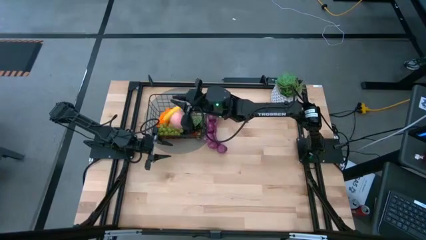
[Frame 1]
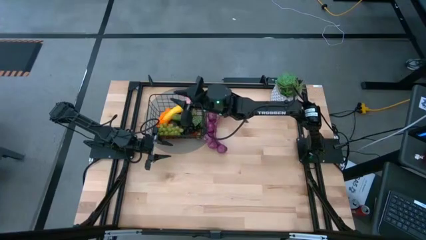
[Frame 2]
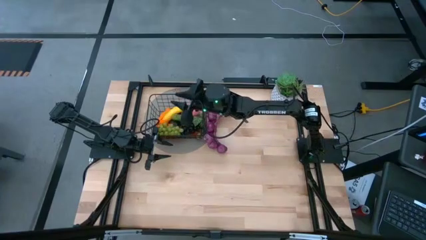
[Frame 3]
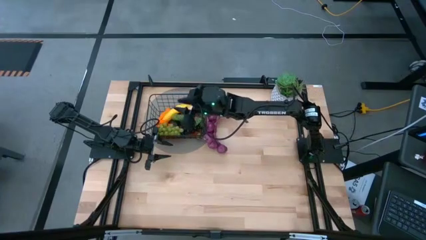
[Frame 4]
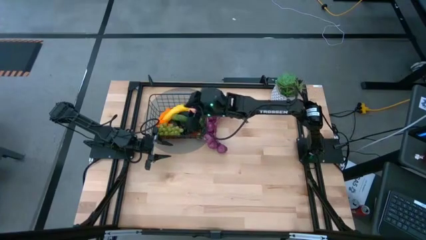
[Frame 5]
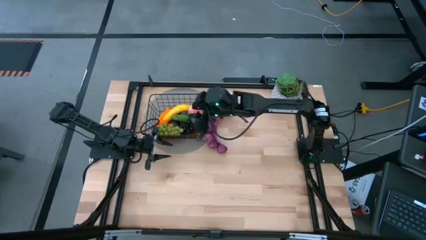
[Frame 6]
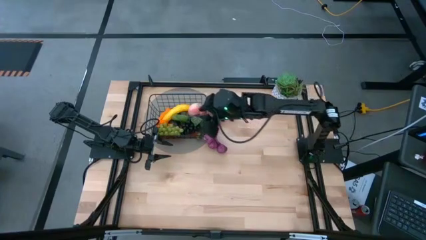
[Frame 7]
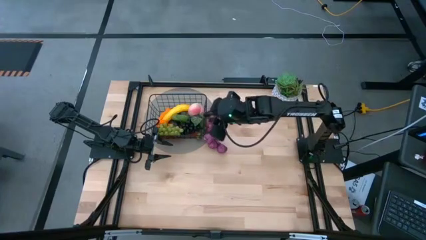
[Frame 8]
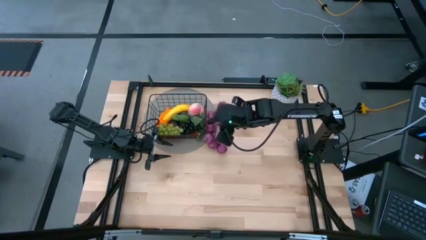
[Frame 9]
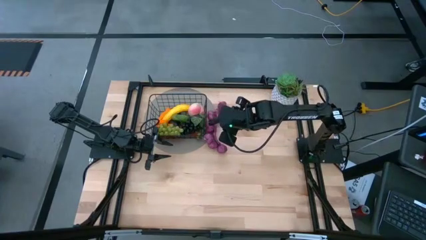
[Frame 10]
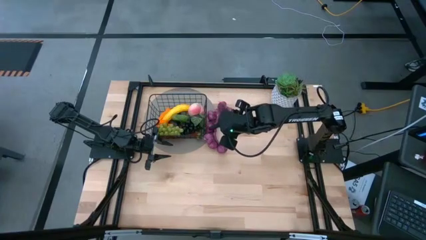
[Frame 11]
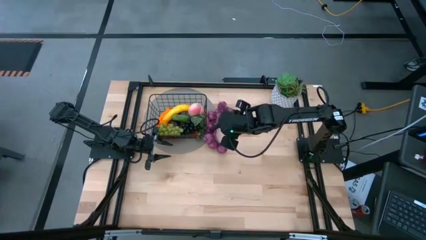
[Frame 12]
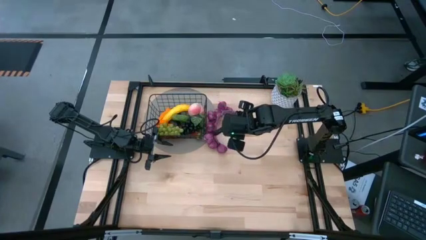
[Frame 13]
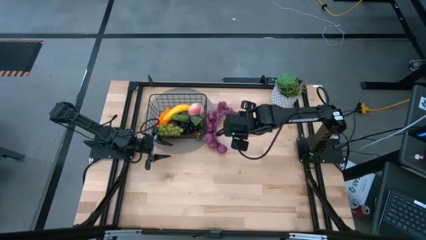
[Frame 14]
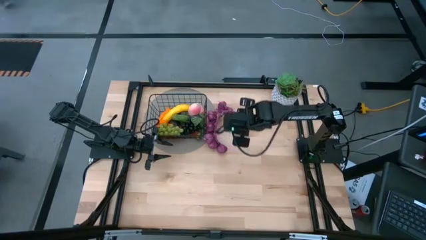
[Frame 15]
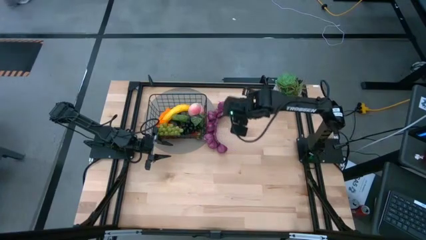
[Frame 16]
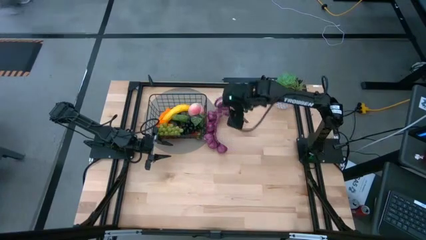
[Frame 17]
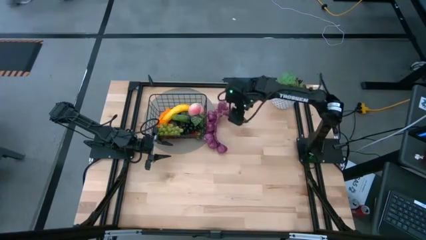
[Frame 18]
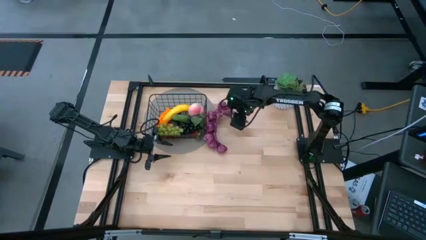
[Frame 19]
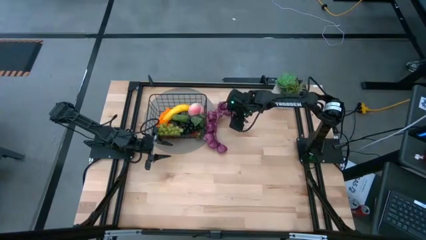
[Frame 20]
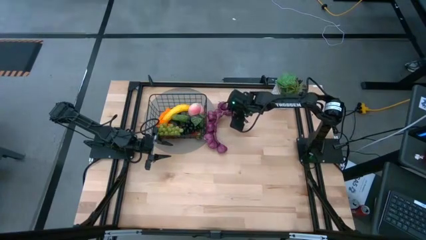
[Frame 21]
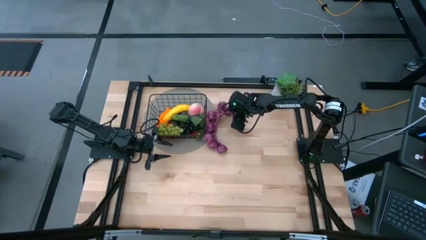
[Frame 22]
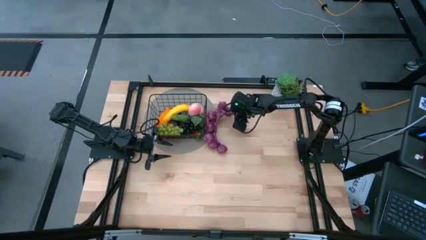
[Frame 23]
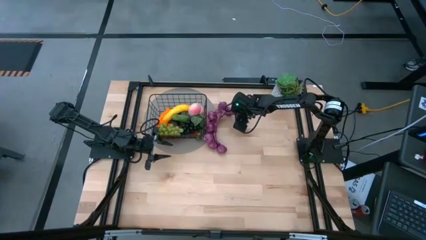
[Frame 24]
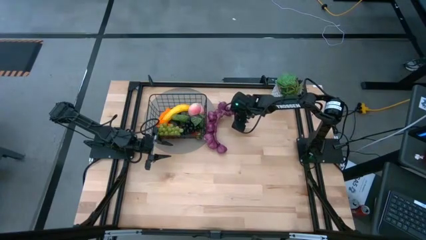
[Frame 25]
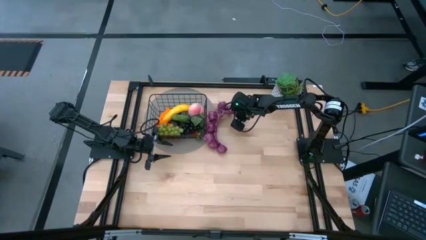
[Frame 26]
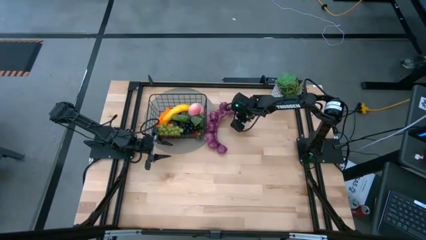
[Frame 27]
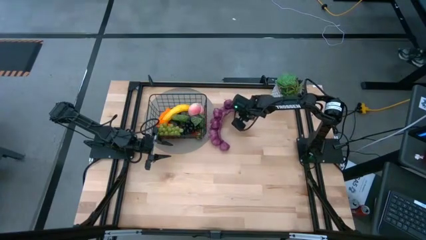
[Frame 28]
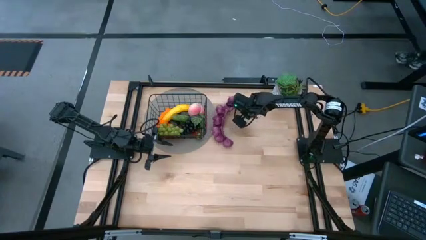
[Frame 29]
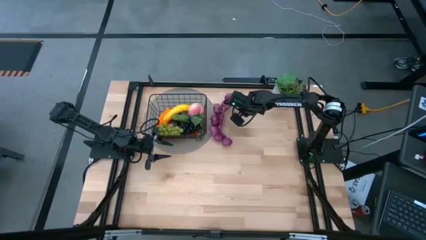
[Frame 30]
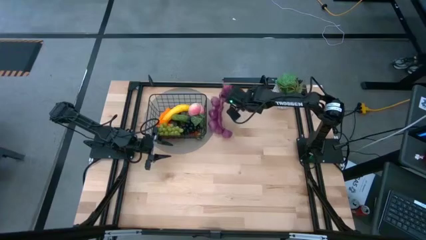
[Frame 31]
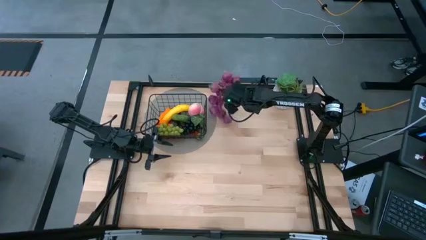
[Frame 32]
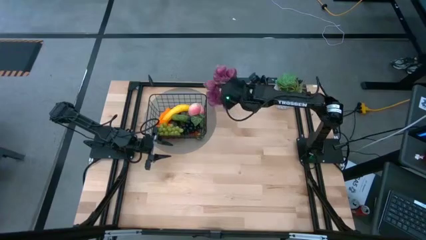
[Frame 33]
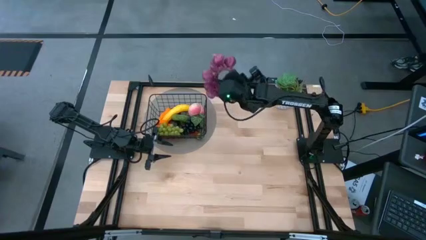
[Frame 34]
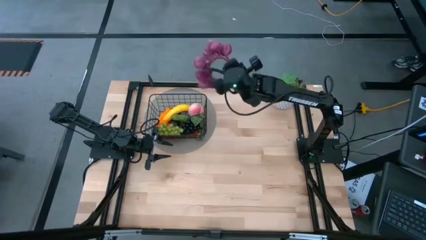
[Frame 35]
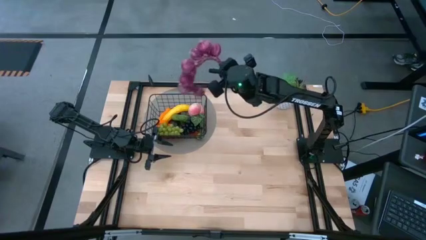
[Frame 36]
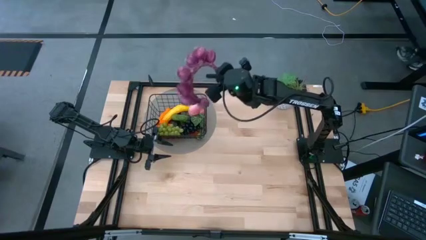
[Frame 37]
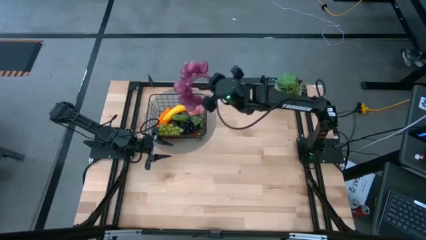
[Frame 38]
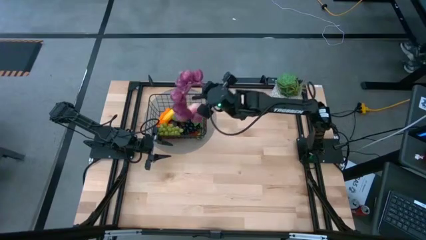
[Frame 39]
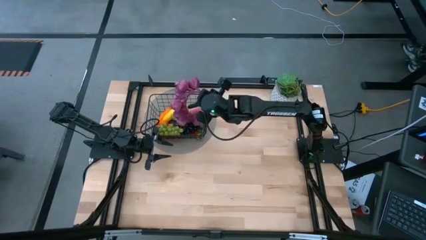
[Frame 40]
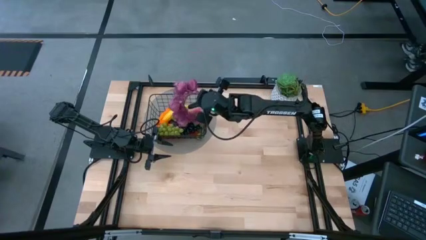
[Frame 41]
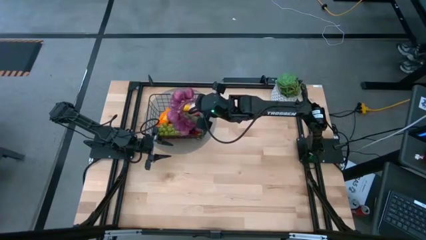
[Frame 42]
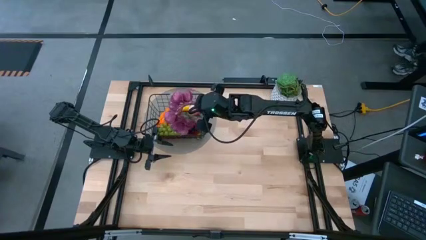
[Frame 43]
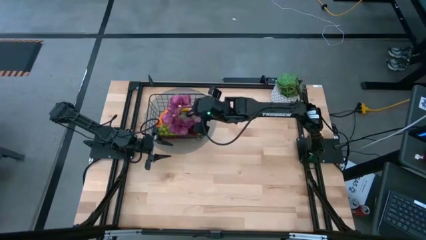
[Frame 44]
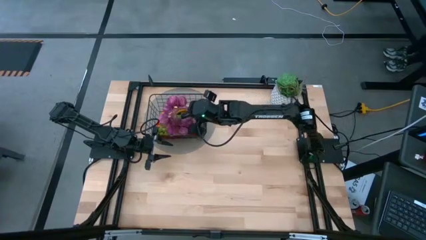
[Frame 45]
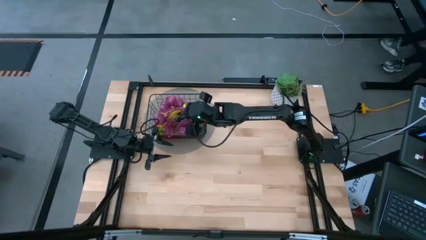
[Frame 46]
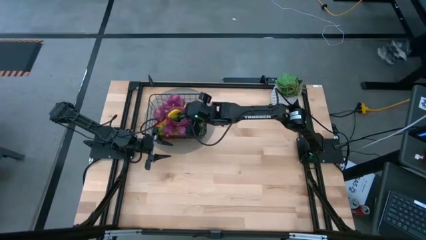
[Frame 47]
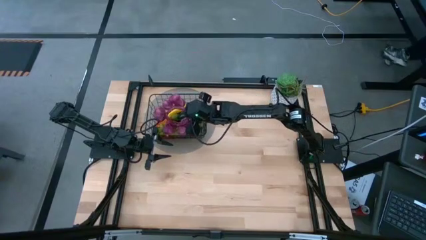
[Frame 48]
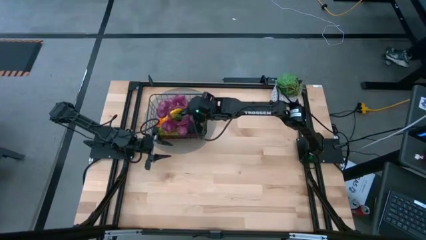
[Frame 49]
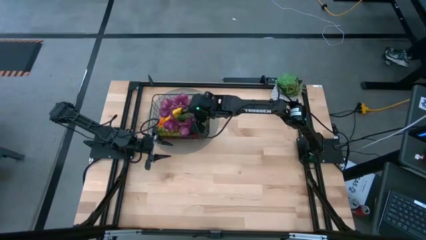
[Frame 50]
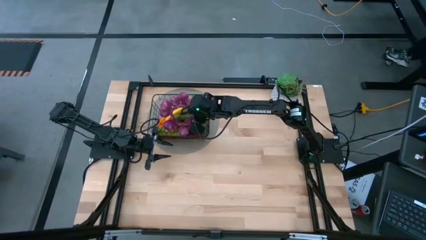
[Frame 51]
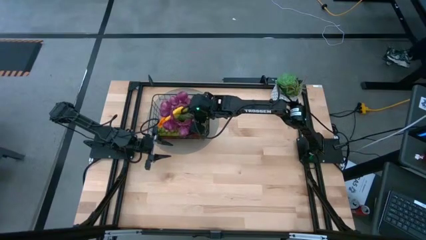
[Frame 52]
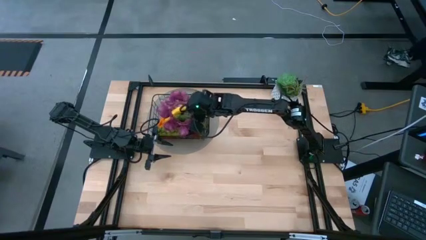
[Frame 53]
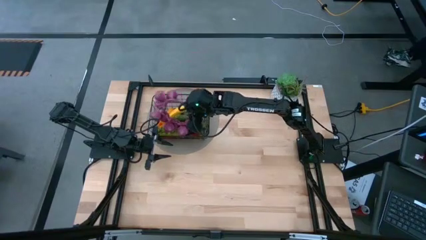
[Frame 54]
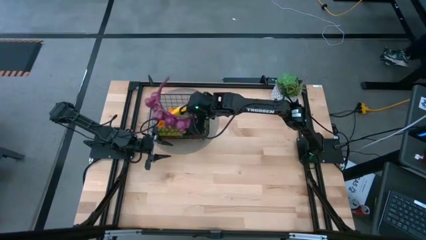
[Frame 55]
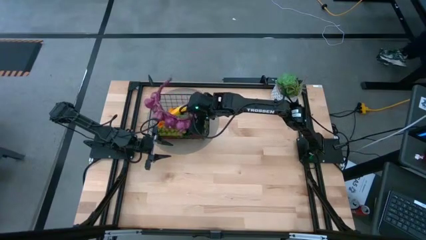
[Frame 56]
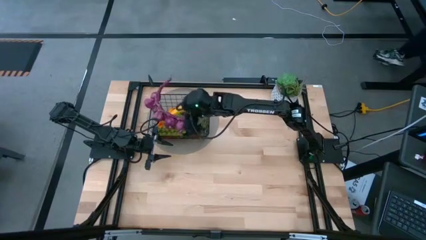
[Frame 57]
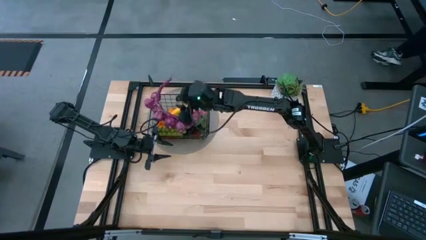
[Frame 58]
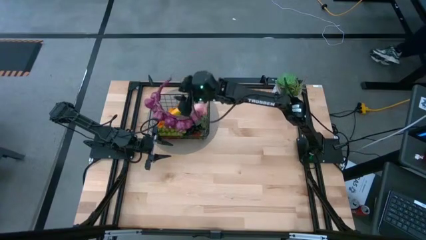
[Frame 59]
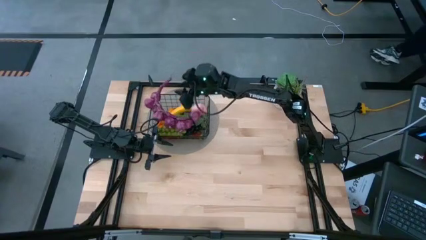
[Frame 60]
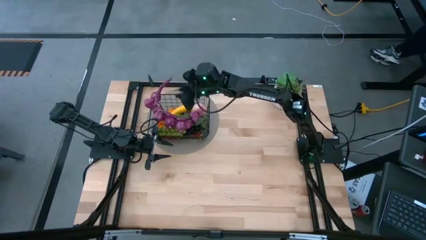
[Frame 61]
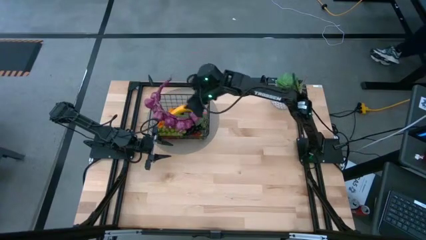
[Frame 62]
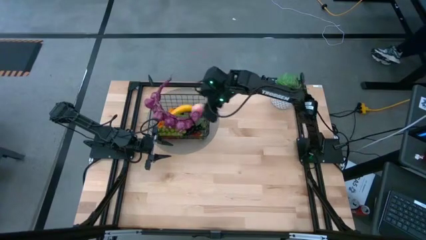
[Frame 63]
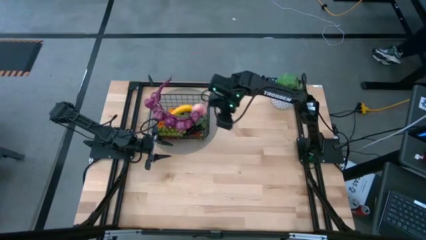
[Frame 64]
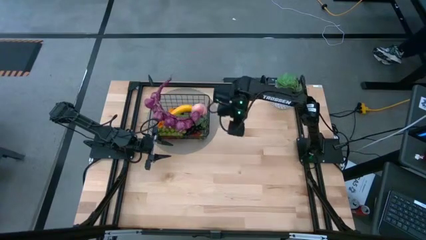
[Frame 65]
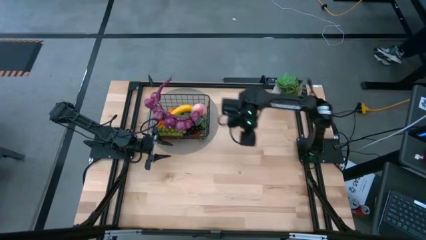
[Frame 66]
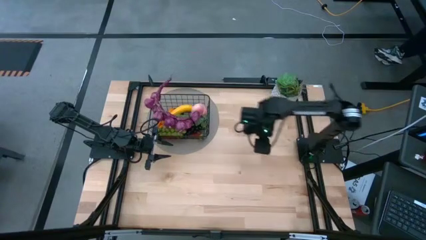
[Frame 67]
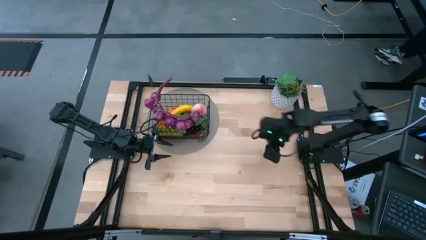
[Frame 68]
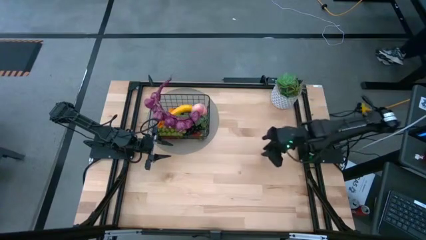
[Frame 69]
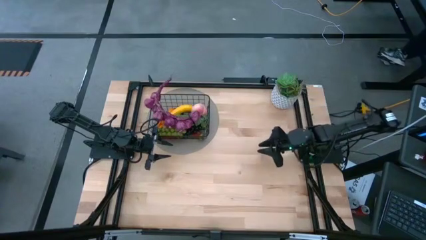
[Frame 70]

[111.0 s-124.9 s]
Task: Build produce basket
Put the purple garlic into the wire basket

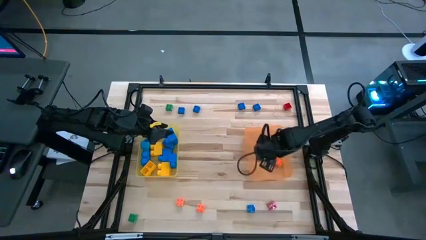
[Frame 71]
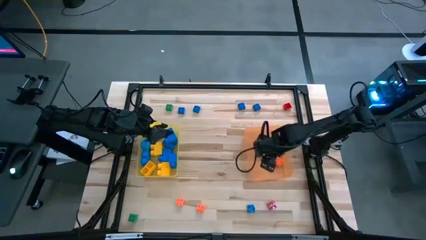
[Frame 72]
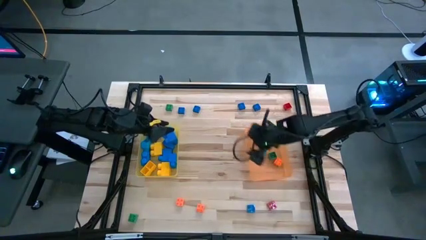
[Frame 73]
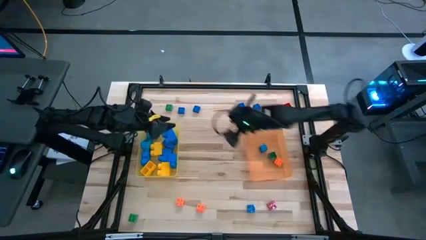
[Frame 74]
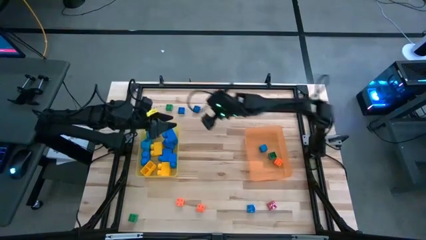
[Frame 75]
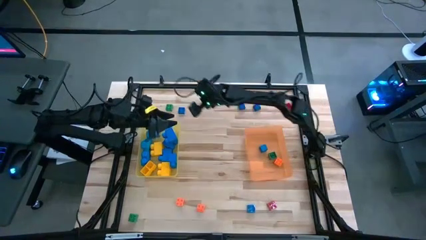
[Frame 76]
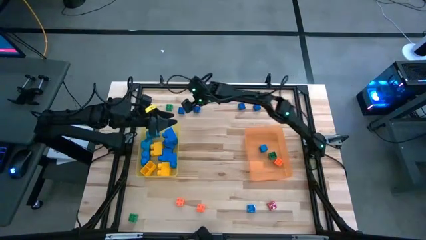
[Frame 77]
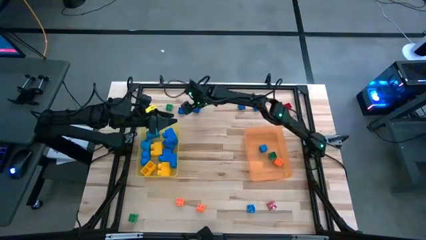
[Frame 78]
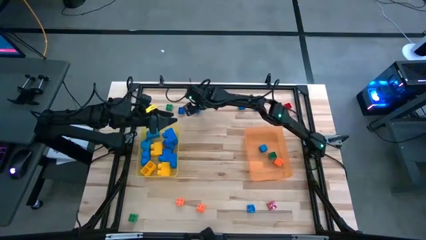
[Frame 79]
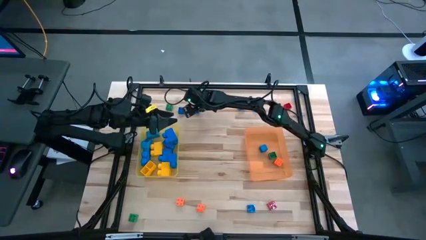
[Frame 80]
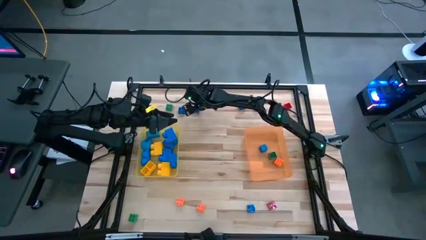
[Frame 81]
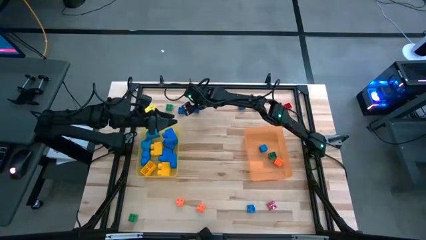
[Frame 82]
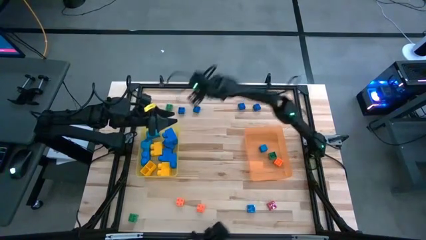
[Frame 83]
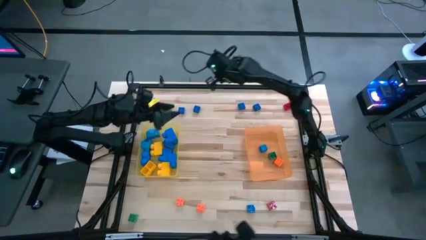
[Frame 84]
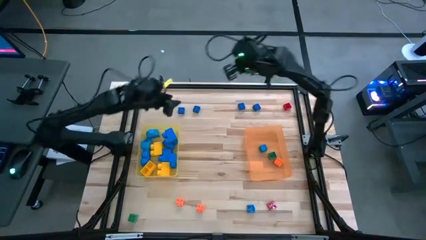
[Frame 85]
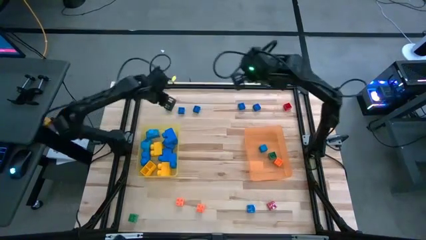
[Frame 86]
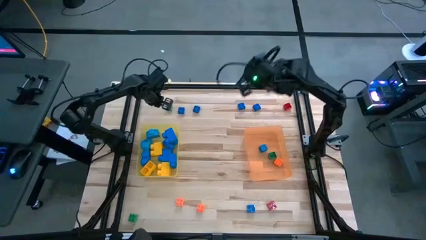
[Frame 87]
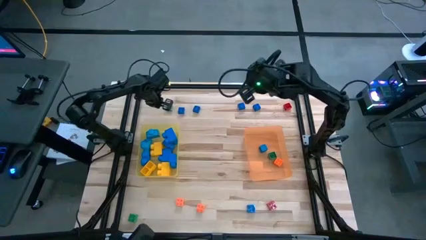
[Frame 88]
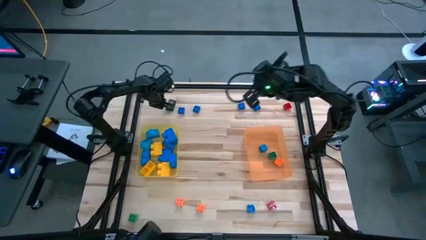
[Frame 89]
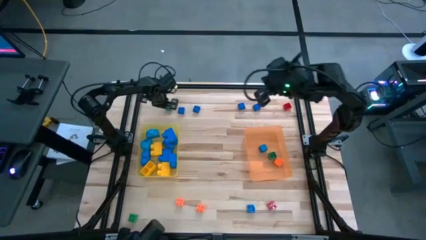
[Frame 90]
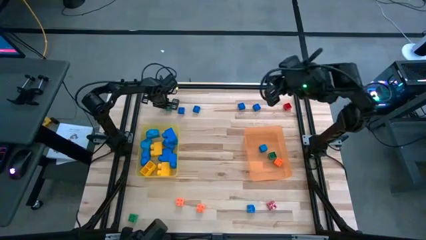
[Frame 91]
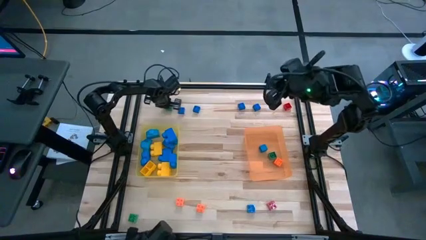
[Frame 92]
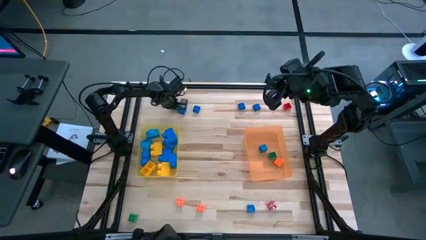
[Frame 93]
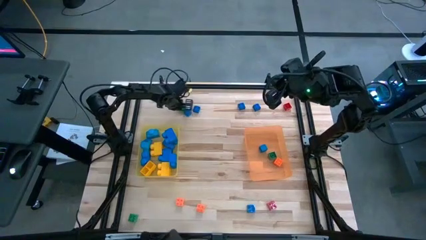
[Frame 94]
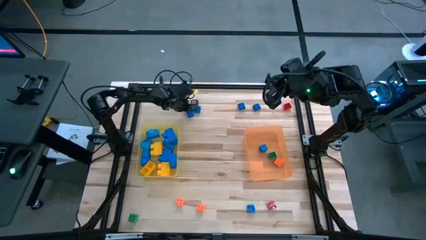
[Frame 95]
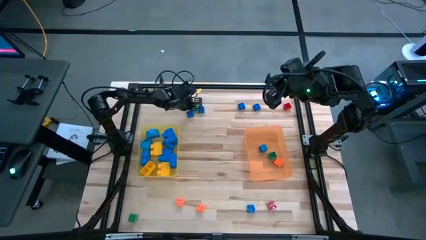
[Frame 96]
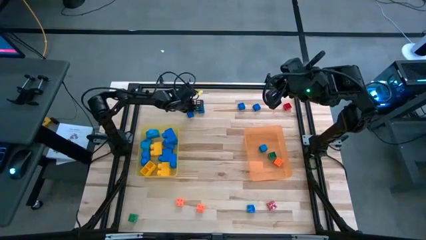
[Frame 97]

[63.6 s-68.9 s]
Task: Sort blocks by size
Adjust the small green game piece
